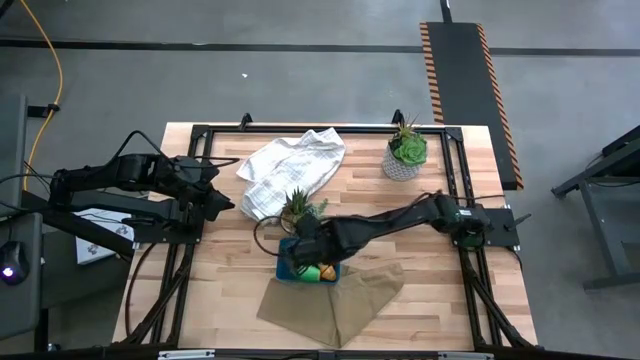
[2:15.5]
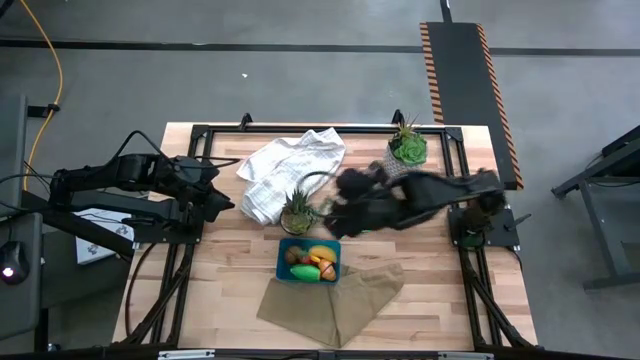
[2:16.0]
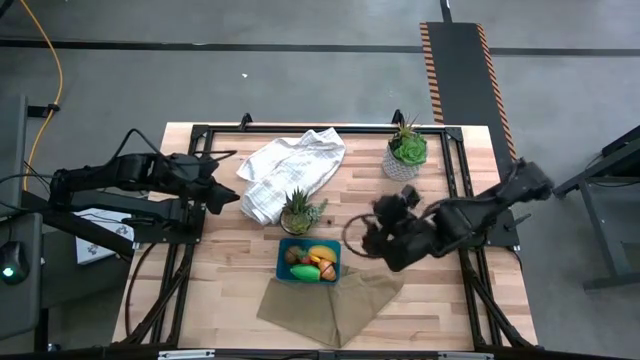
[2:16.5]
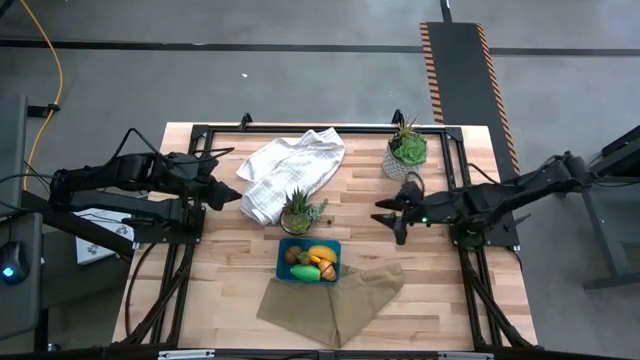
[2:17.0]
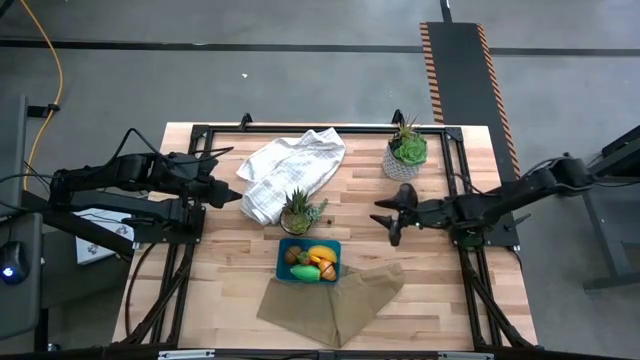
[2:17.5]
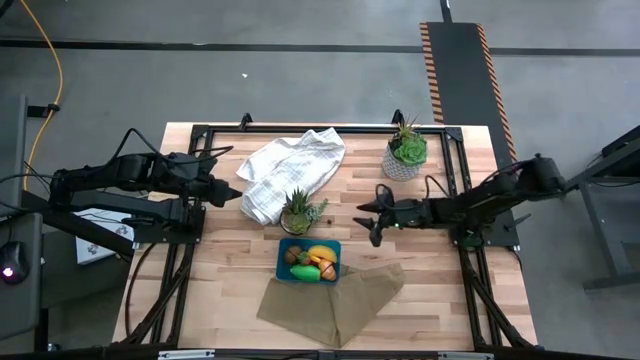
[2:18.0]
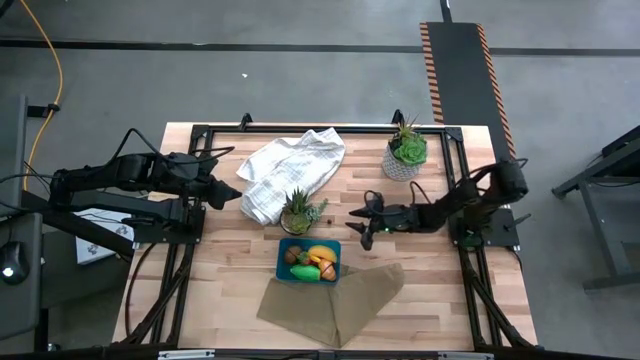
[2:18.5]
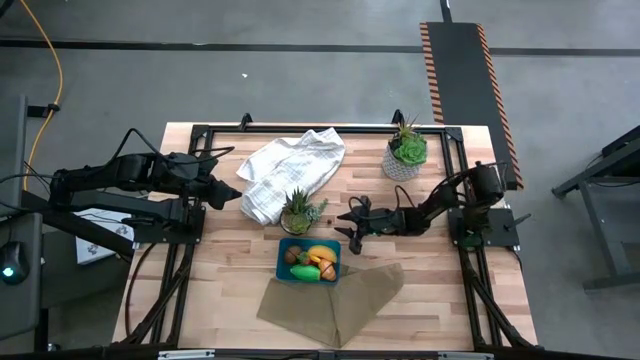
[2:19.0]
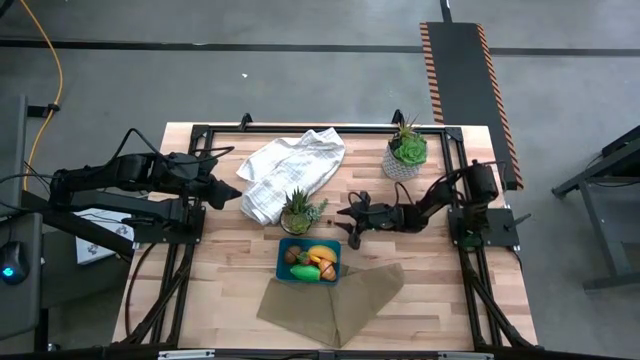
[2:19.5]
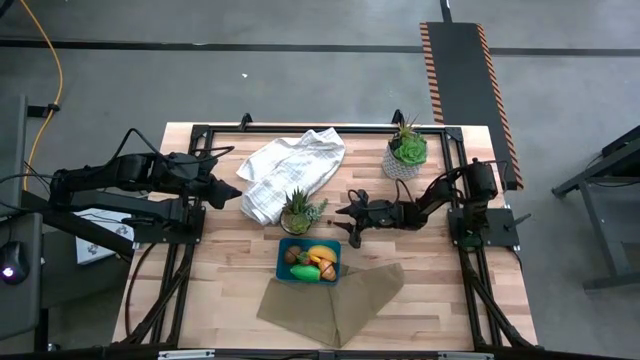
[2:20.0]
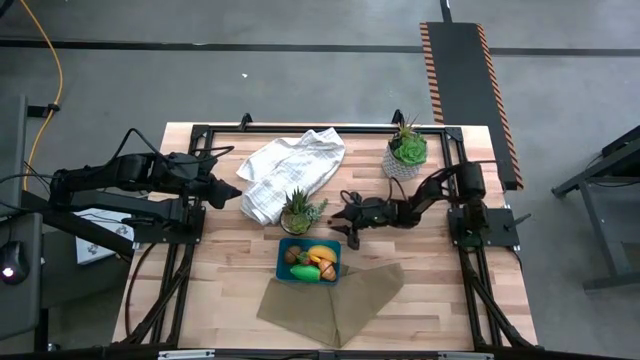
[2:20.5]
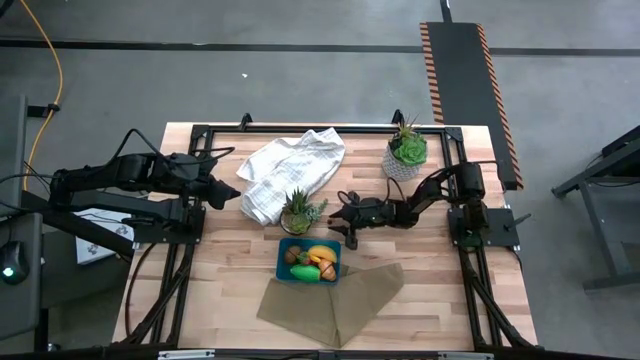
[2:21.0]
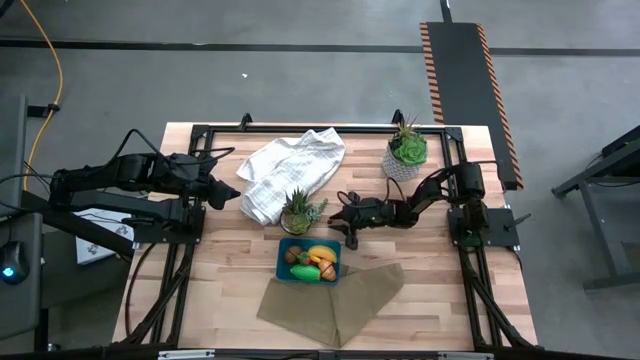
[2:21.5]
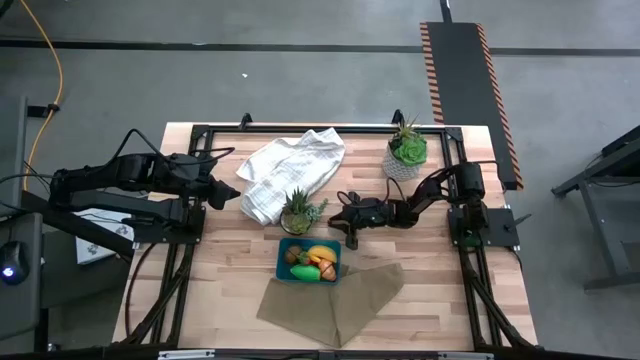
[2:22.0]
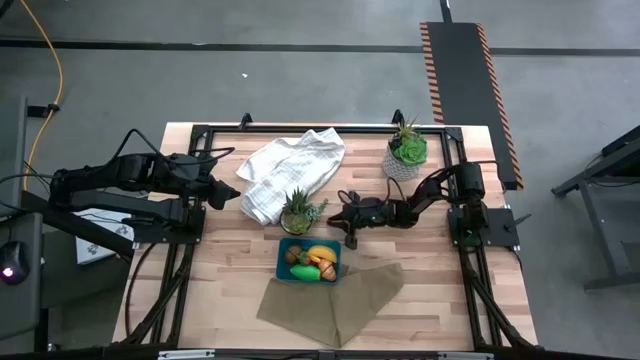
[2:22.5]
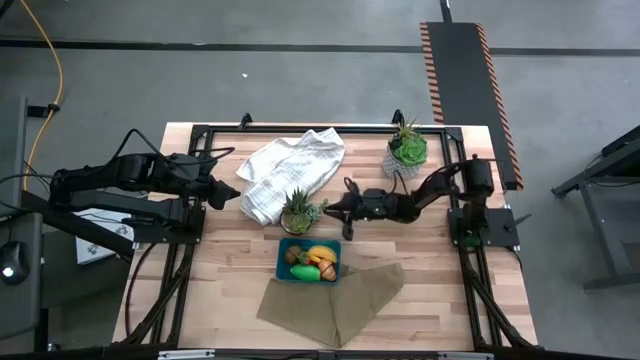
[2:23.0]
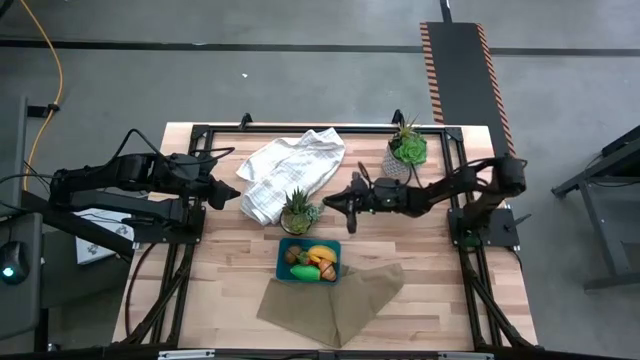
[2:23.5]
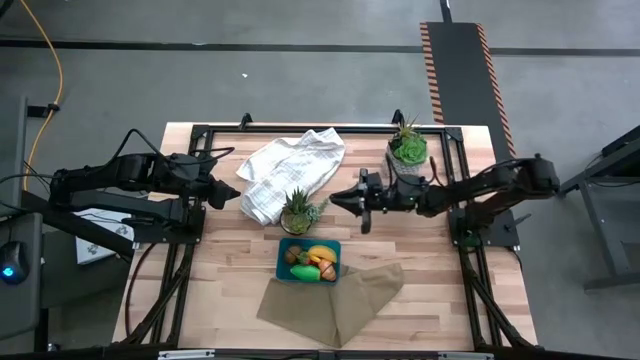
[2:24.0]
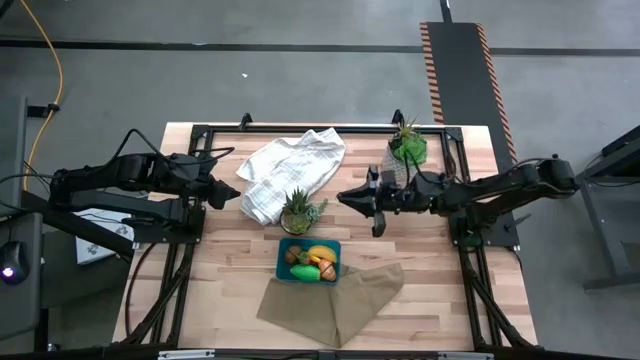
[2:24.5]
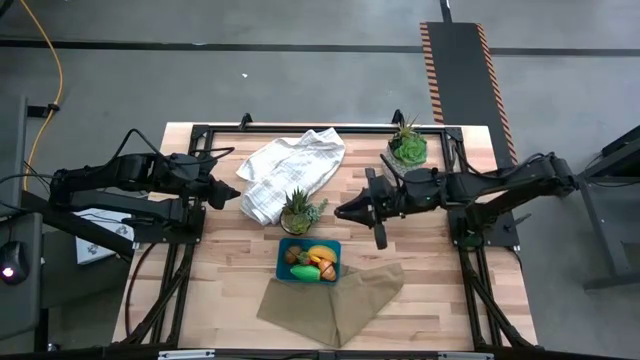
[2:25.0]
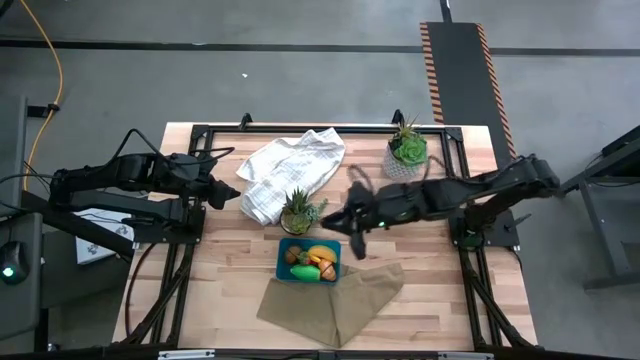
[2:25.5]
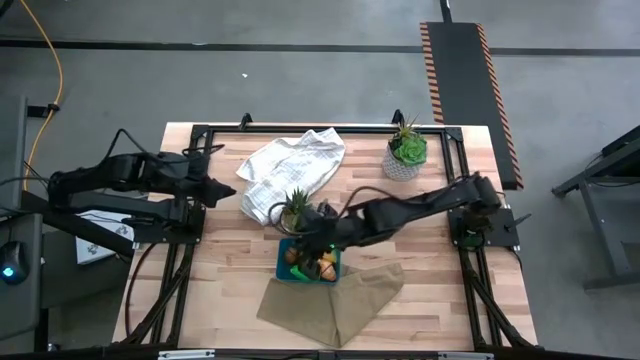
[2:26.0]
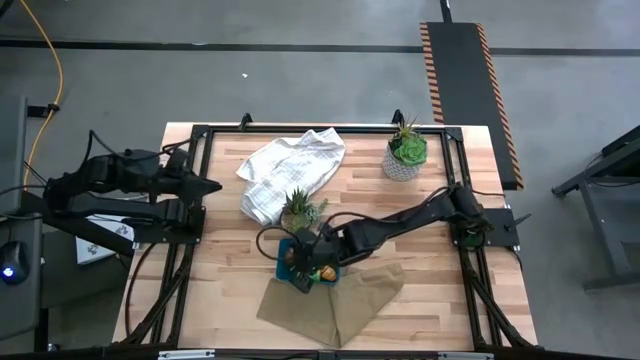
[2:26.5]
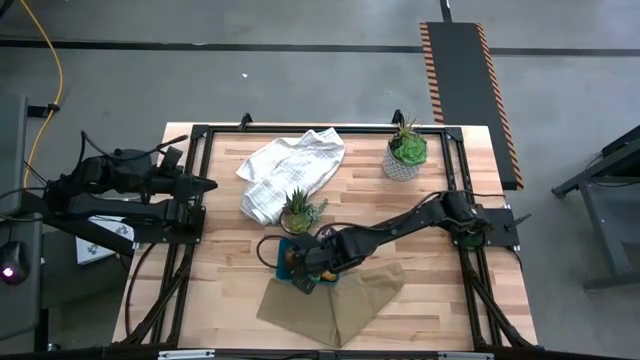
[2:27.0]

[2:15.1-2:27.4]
Task: Pick and placing Produce into tupperware
Put the blueberry into the blue bin

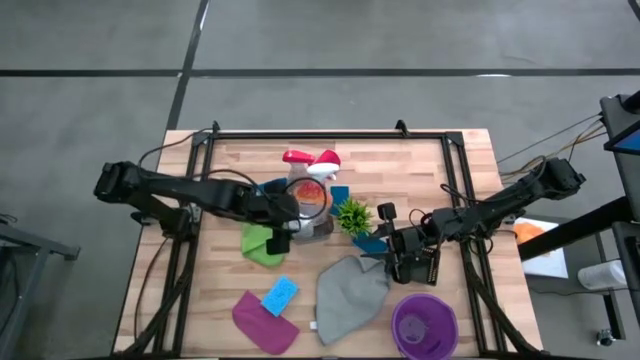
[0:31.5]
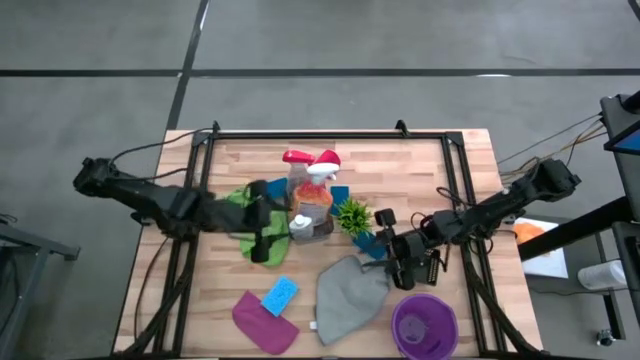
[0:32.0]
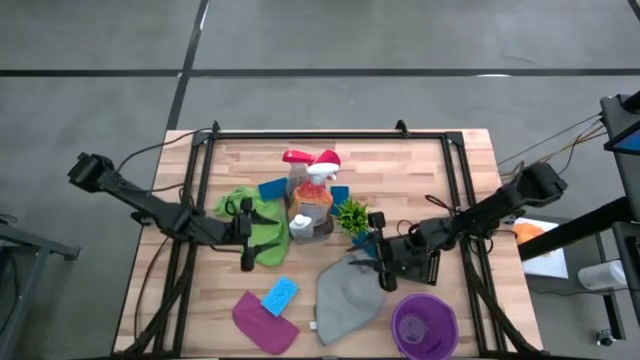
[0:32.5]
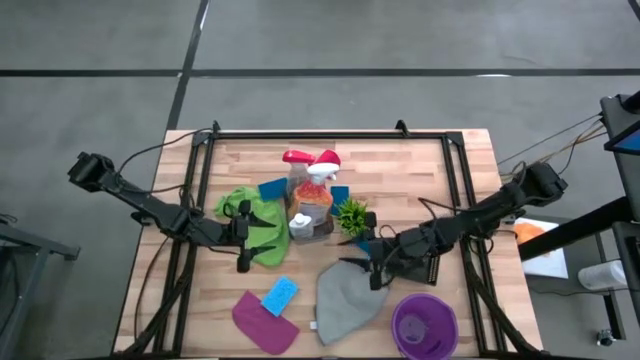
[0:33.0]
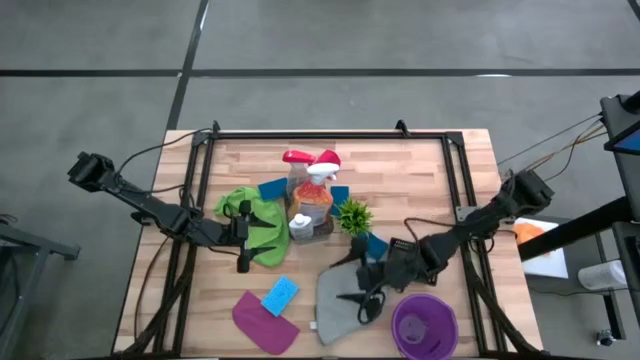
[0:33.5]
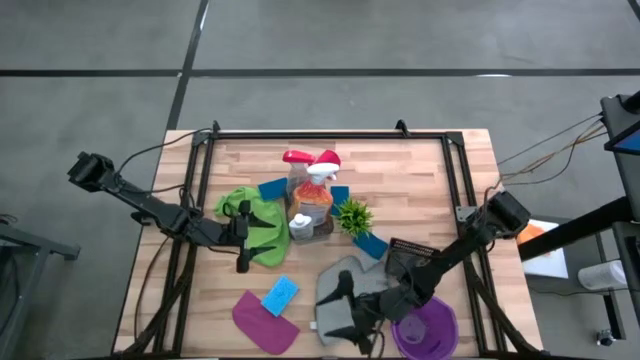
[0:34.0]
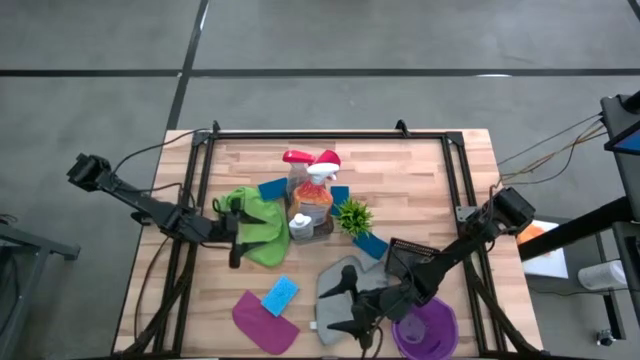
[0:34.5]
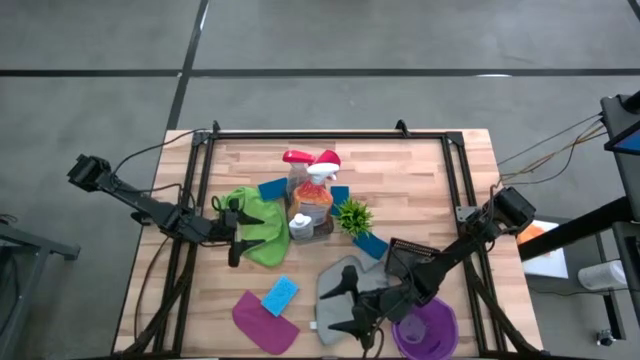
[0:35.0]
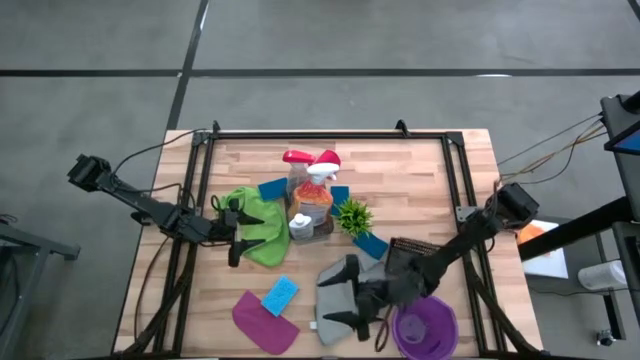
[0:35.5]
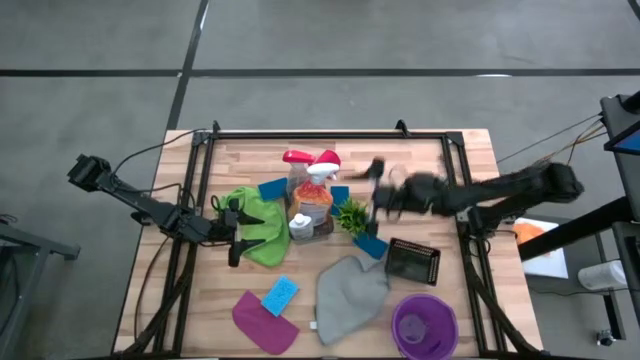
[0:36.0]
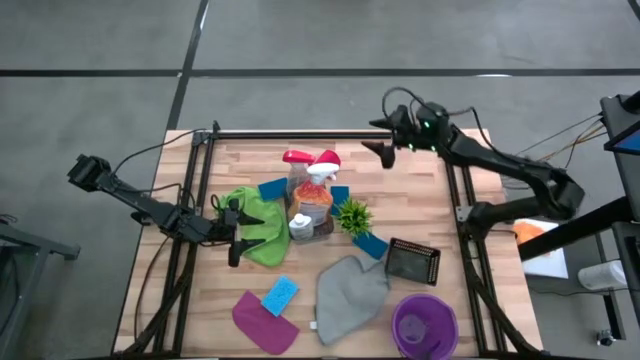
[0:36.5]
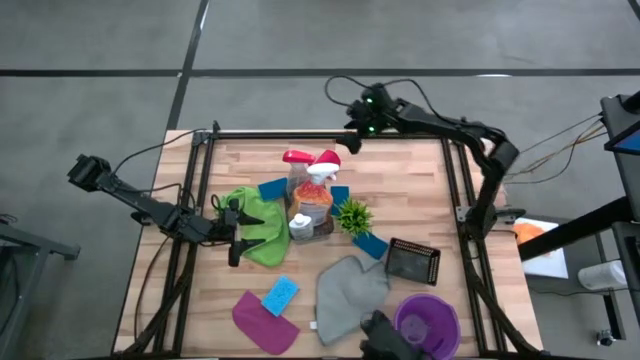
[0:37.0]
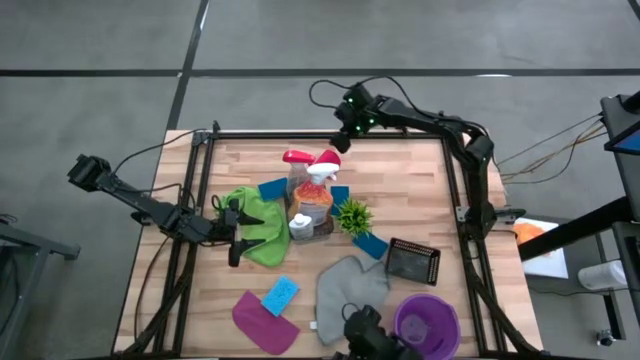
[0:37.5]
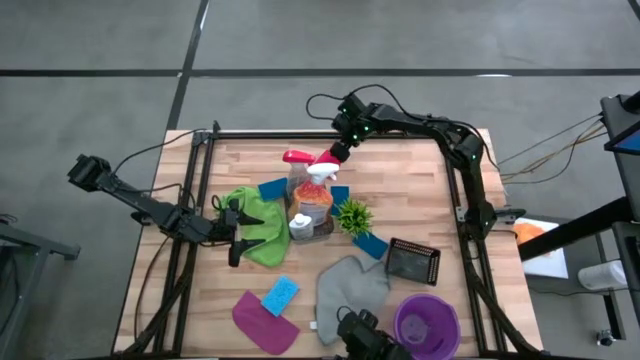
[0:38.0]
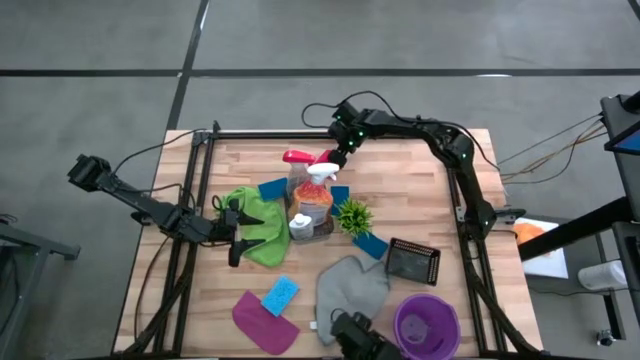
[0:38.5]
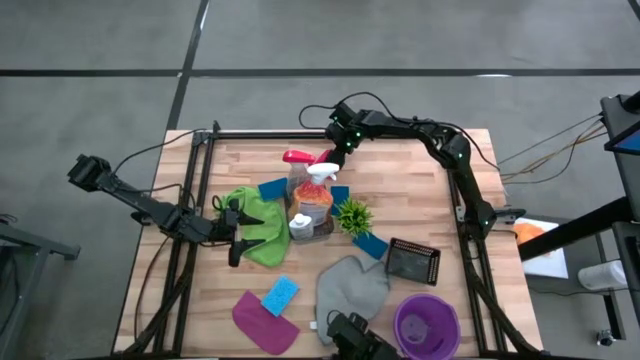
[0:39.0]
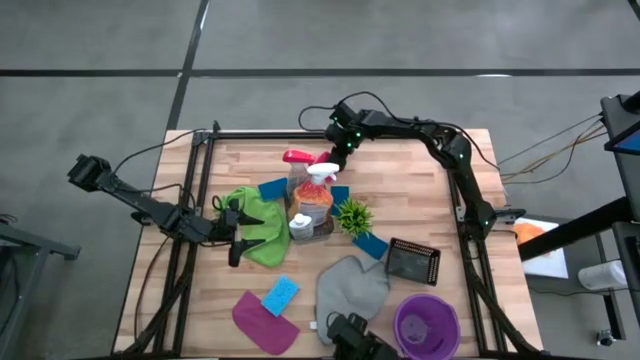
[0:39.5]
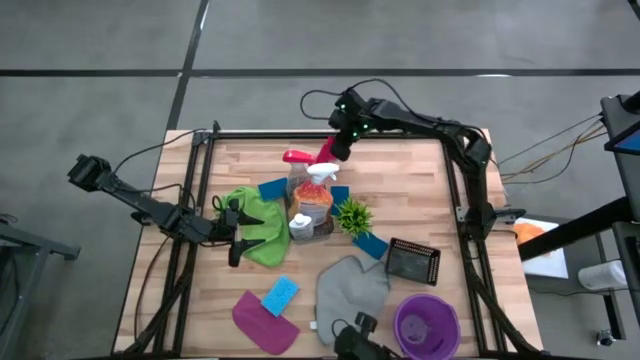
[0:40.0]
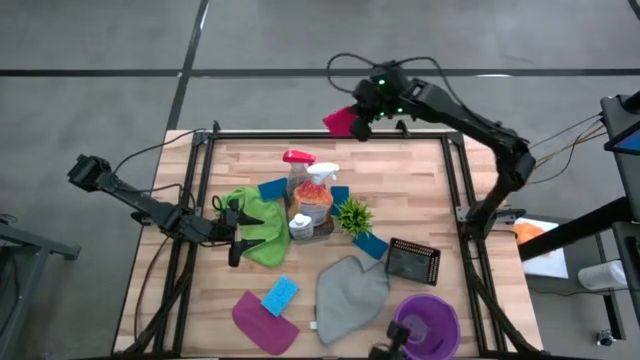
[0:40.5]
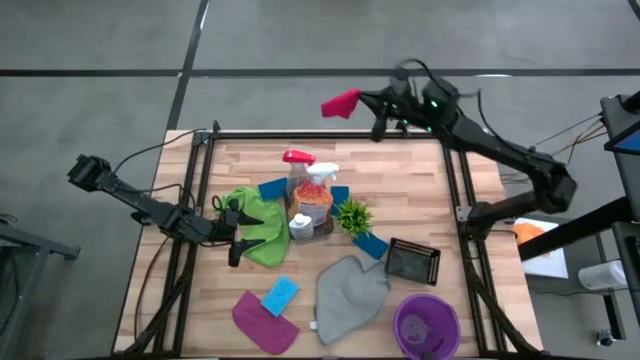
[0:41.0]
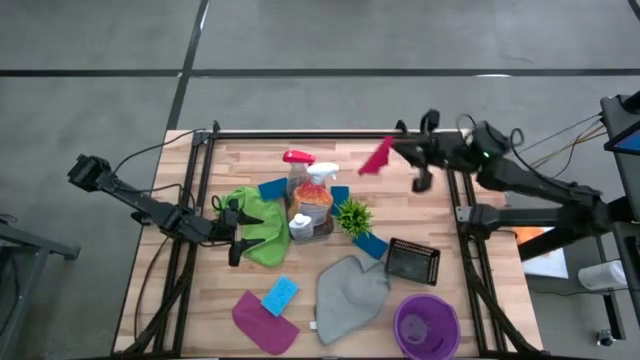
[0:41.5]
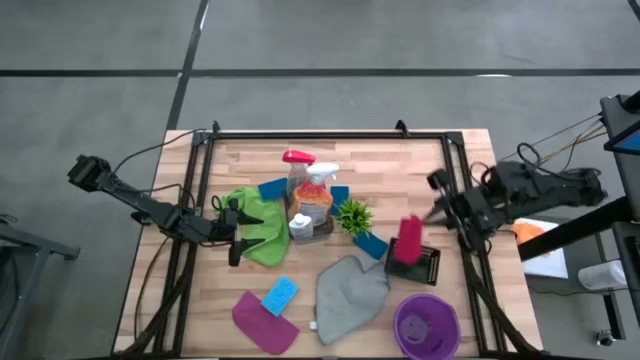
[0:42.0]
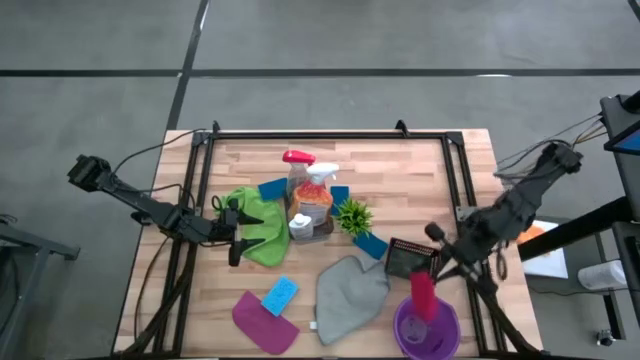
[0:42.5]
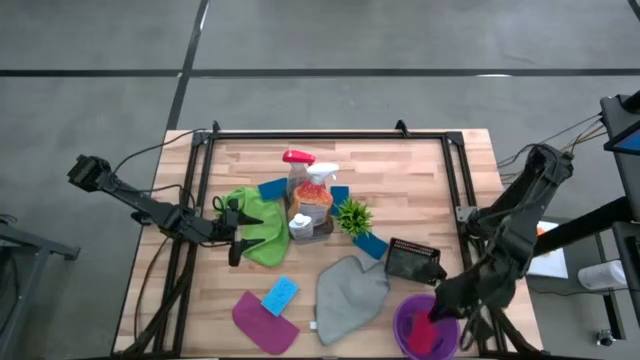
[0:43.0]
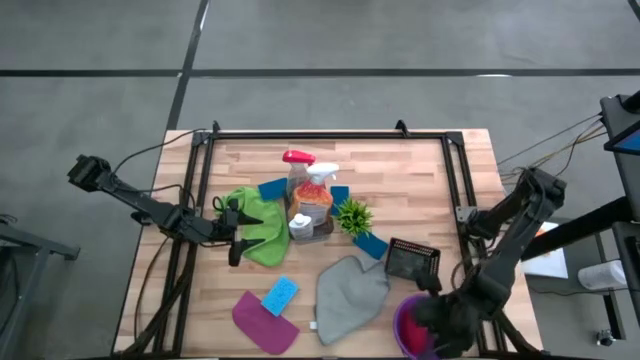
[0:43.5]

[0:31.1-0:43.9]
Task: Pick & Place Kitchen Items
Put the red towel into the purple bucket
